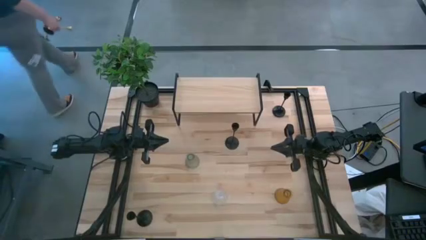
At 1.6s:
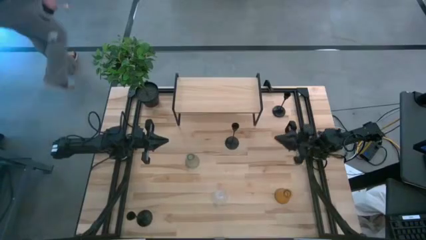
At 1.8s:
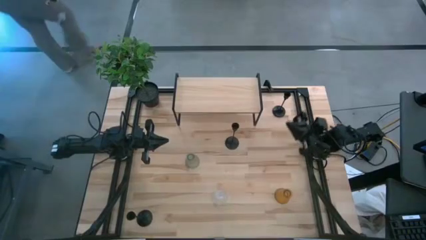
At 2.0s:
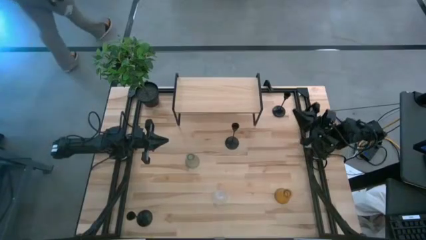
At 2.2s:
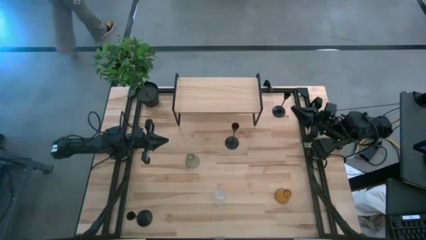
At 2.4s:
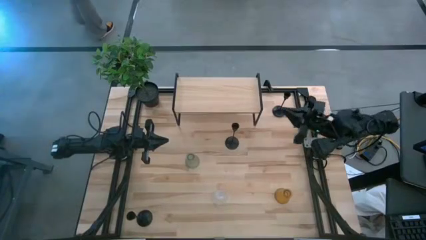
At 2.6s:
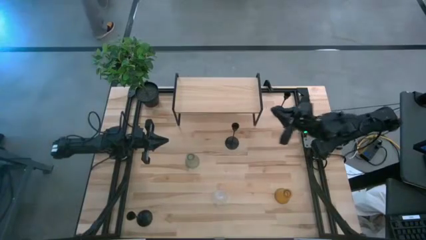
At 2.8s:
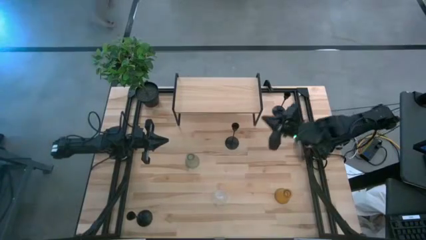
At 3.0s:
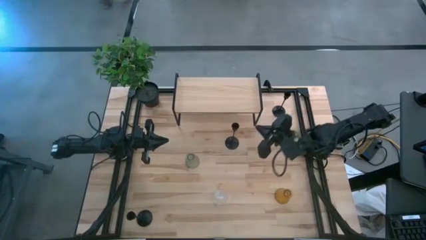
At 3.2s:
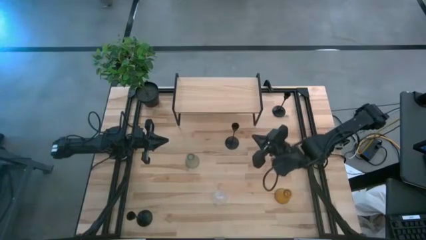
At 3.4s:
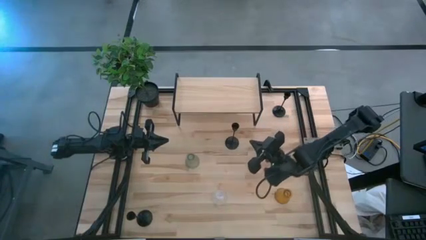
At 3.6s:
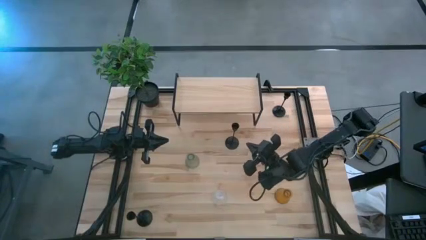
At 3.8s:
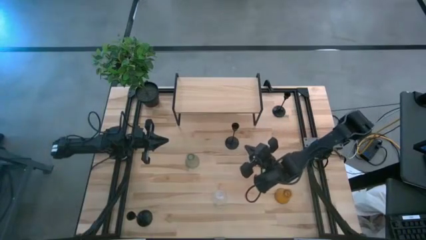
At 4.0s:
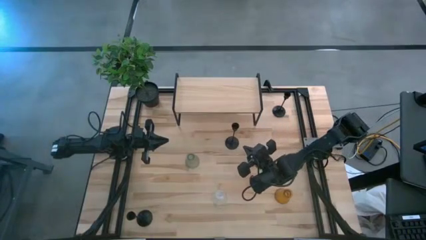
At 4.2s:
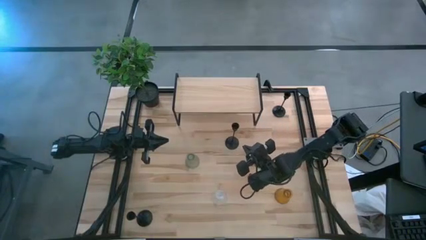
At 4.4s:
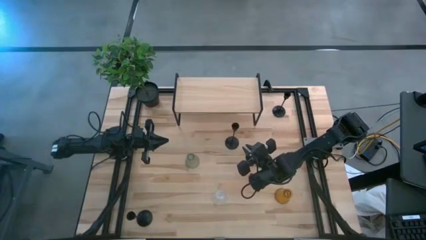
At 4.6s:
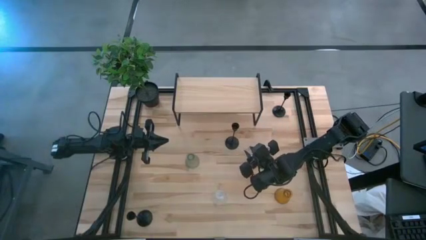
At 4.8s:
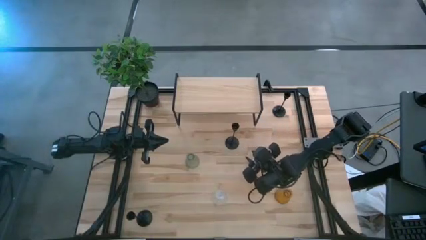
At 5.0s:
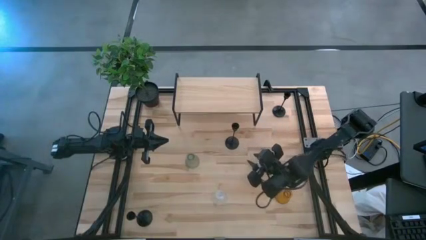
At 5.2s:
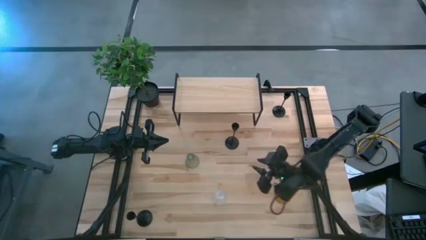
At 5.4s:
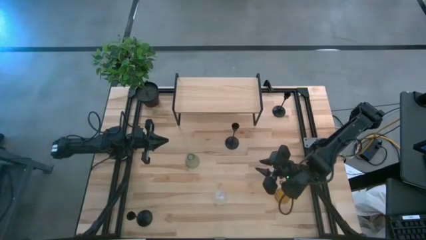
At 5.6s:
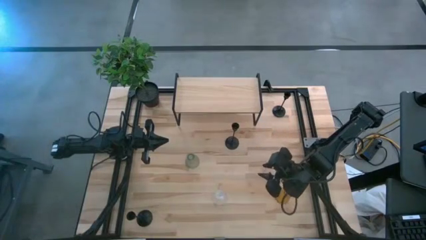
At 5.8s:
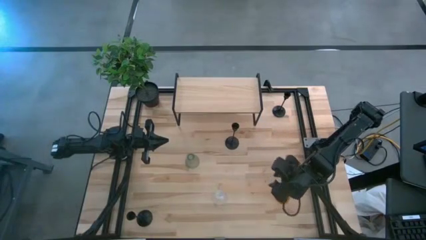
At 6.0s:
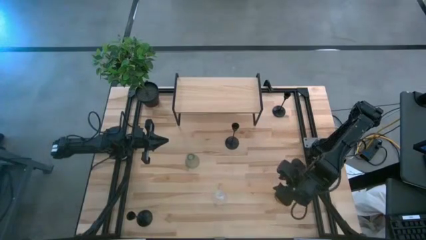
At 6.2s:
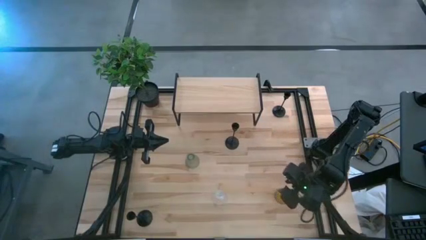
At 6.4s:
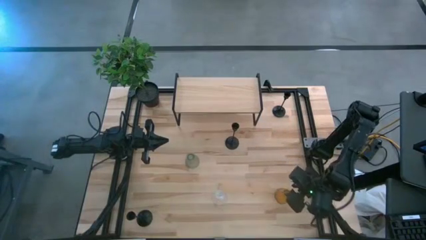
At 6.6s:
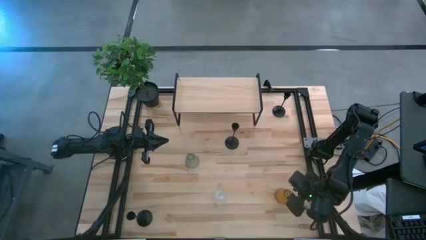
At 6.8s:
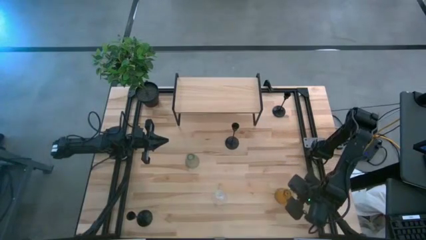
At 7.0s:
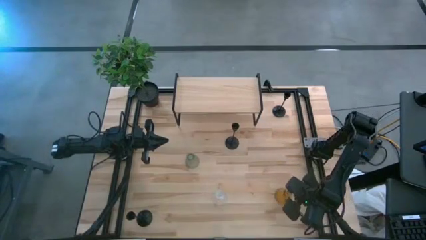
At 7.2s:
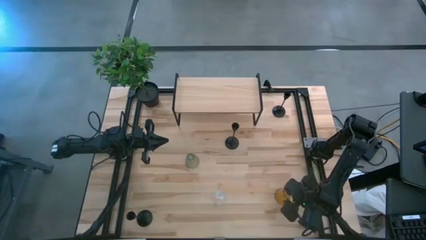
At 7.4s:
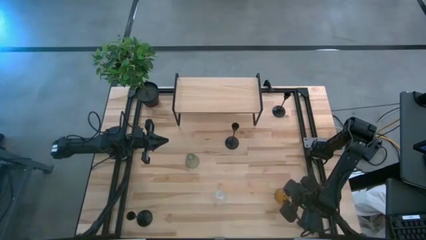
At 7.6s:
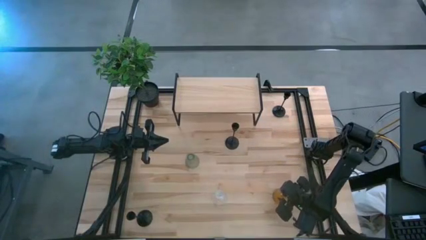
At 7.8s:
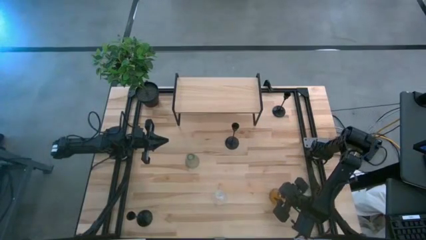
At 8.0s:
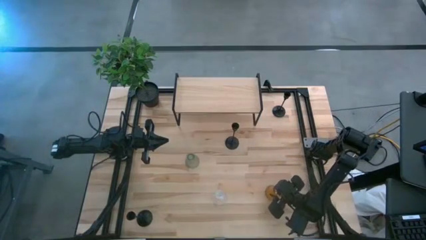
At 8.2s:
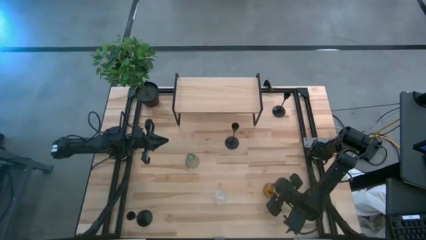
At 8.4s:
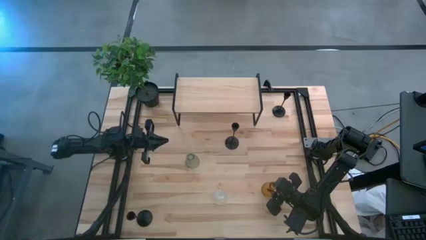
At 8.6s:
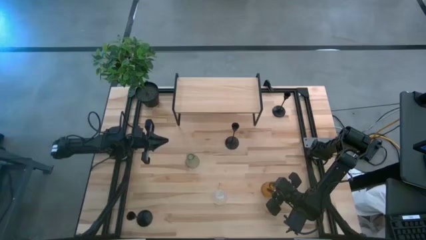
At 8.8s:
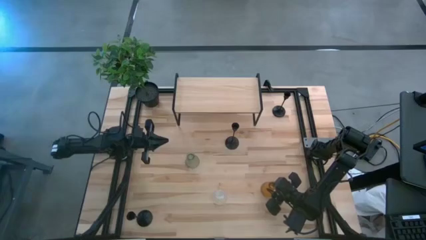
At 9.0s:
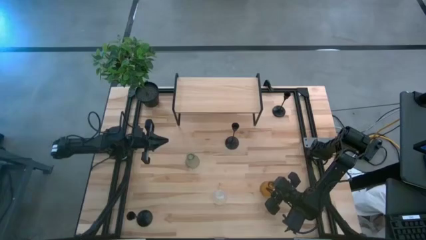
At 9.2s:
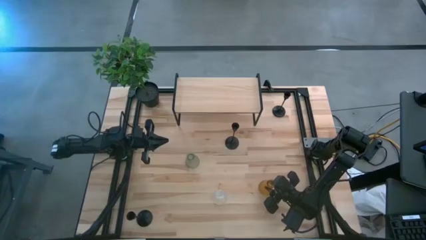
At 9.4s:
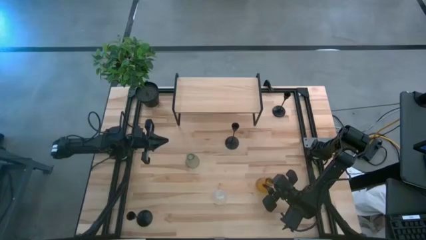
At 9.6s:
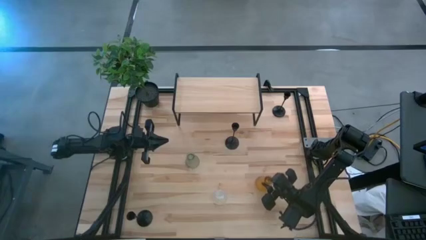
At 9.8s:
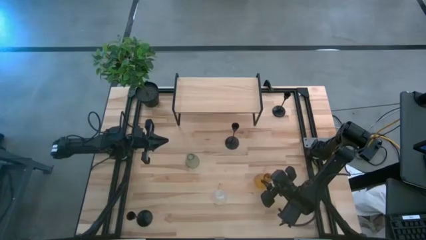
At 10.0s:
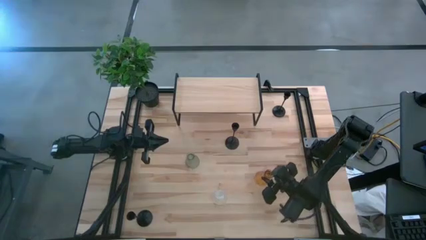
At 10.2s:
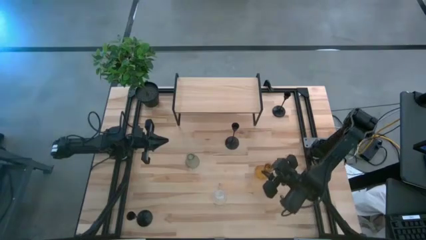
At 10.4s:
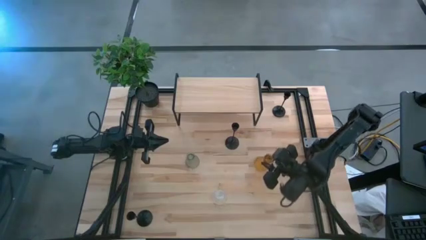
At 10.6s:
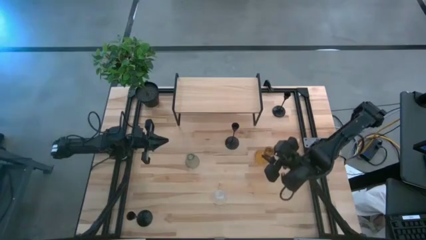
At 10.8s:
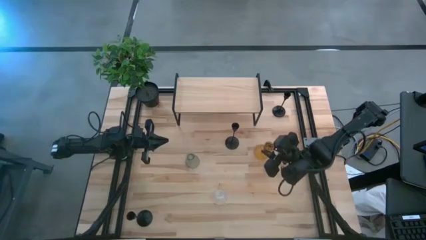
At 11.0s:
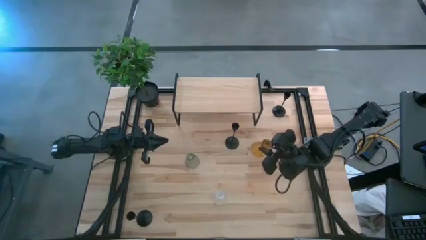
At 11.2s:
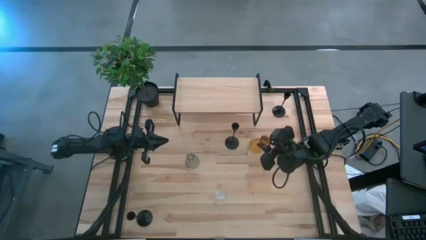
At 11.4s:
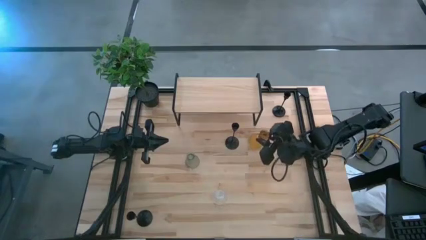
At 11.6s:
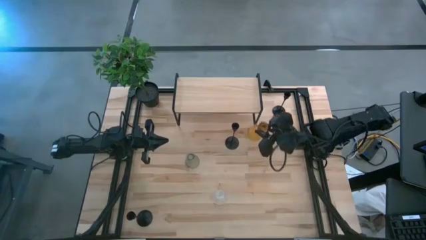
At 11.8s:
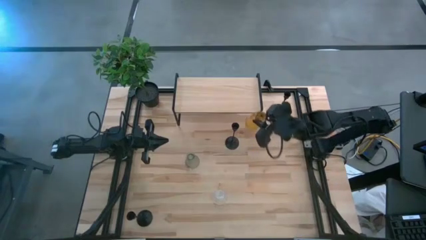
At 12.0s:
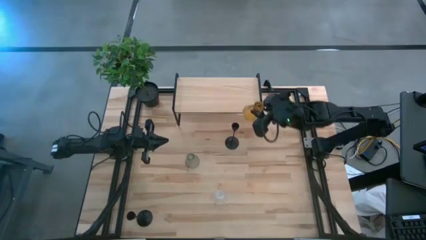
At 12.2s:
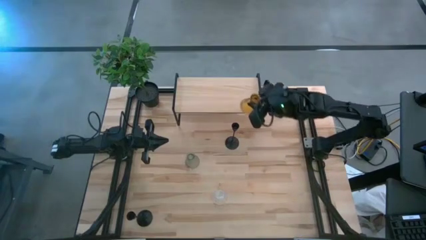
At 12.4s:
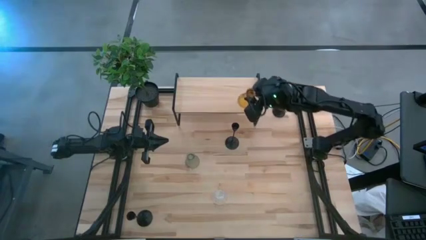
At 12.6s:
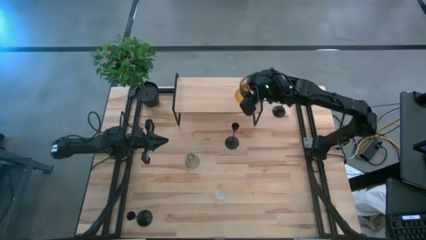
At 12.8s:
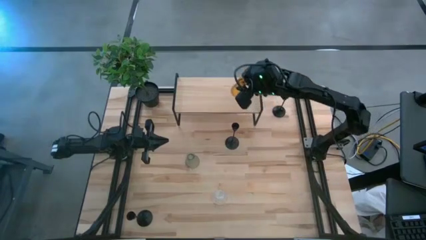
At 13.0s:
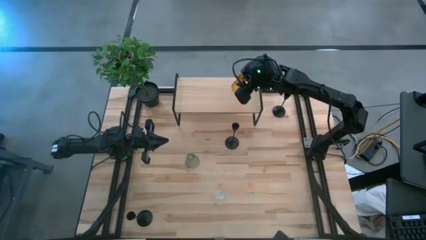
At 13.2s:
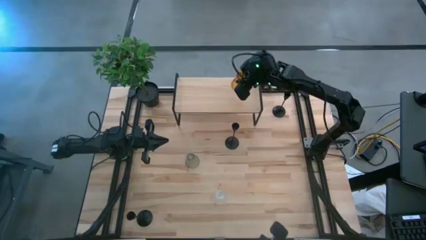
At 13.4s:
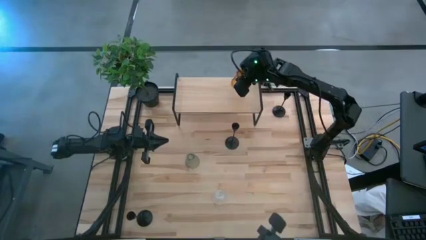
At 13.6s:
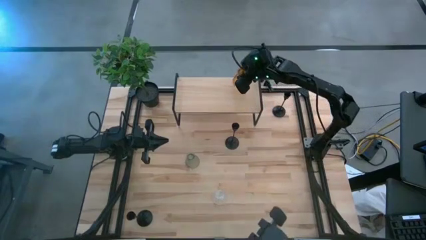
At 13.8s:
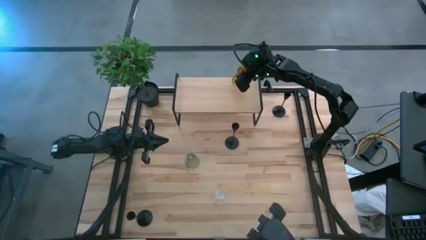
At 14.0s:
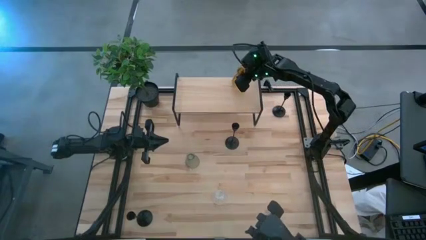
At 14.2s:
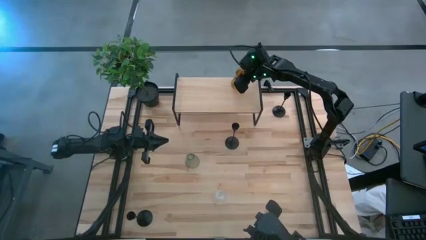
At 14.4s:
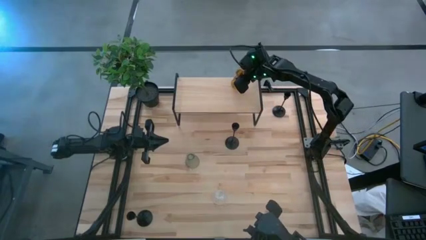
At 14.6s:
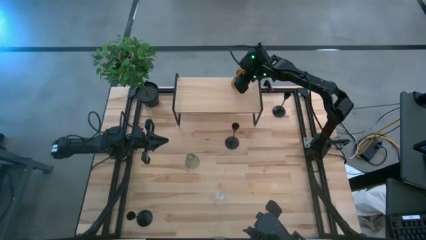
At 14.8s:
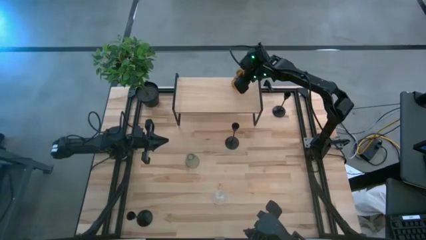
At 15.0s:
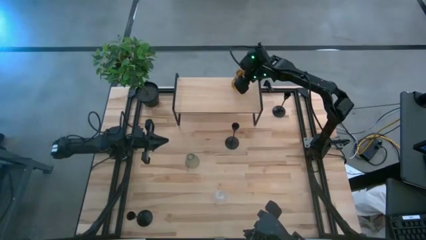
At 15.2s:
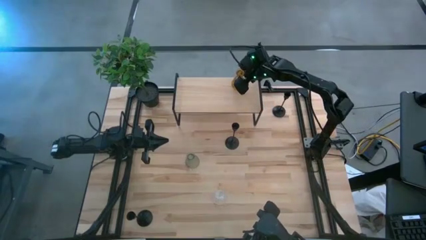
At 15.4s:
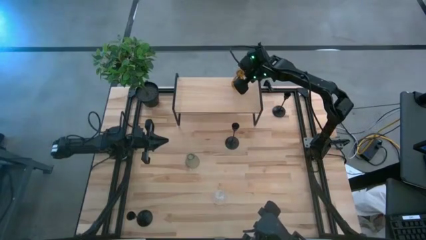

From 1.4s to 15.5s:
Task: Pick & Place candle stick holders
Put the orange candle holder on the shelf
